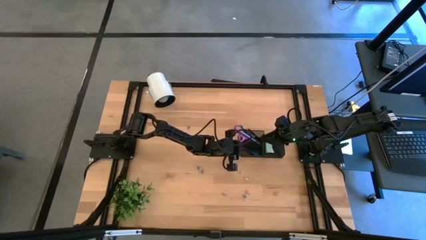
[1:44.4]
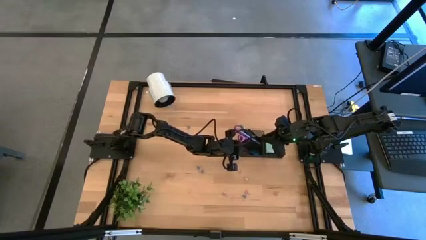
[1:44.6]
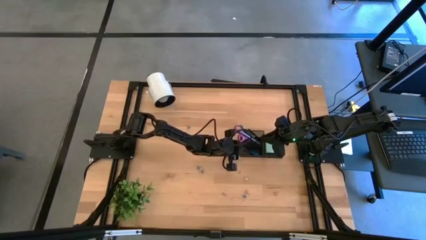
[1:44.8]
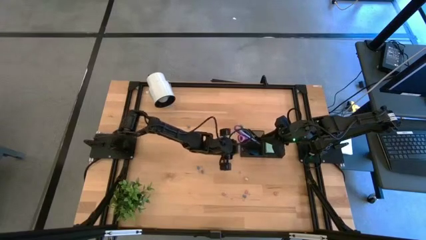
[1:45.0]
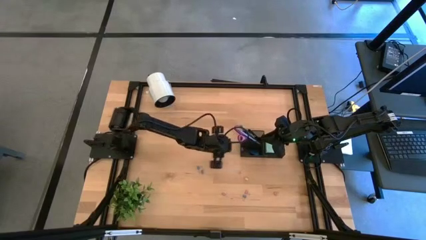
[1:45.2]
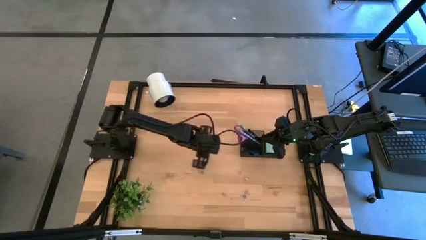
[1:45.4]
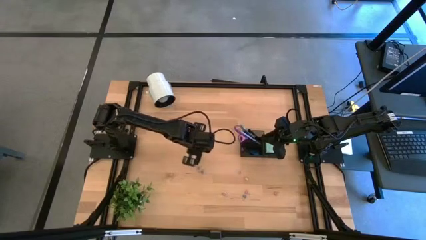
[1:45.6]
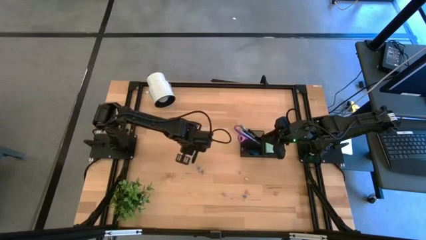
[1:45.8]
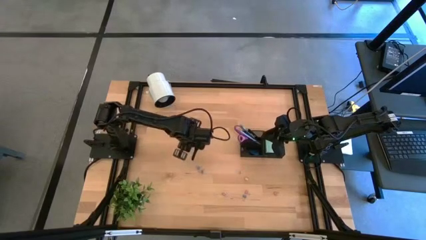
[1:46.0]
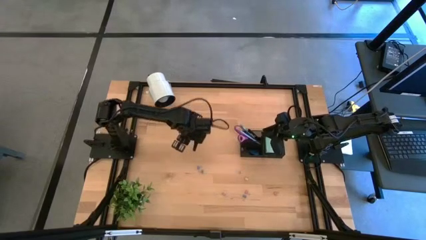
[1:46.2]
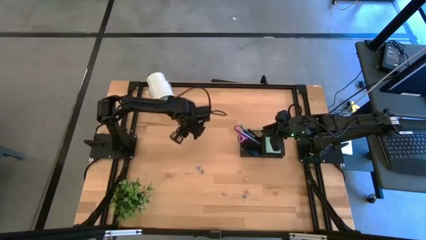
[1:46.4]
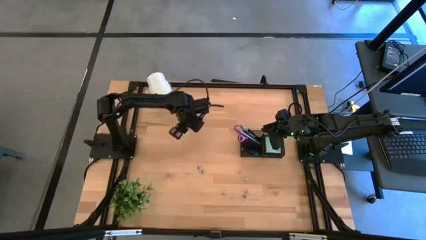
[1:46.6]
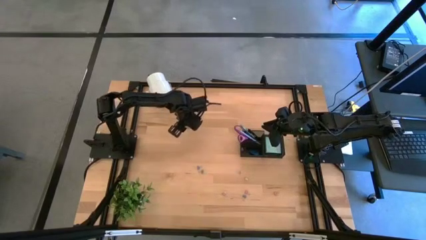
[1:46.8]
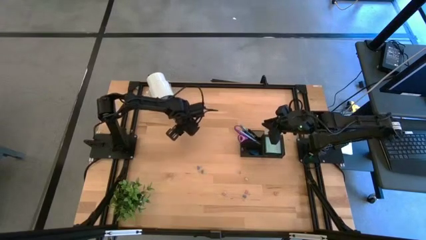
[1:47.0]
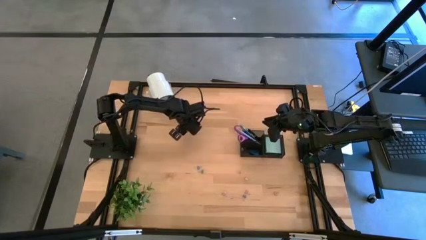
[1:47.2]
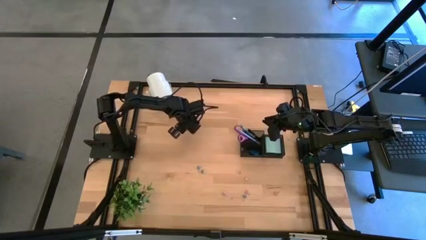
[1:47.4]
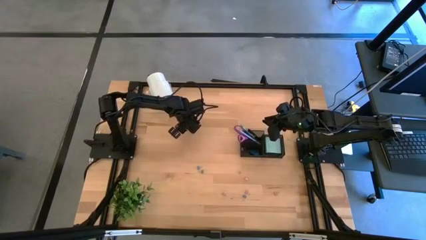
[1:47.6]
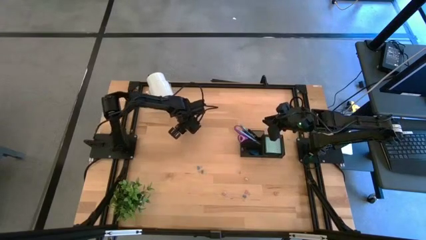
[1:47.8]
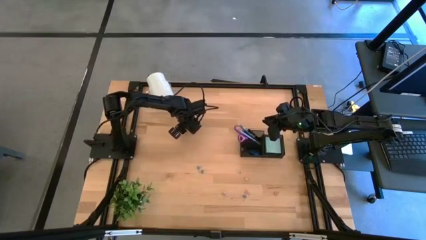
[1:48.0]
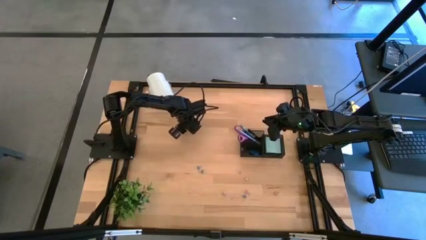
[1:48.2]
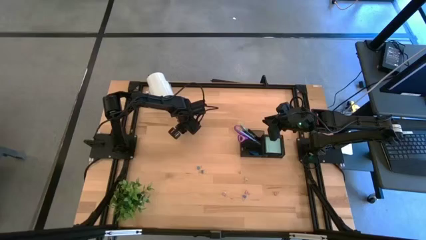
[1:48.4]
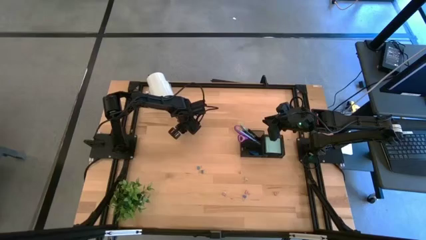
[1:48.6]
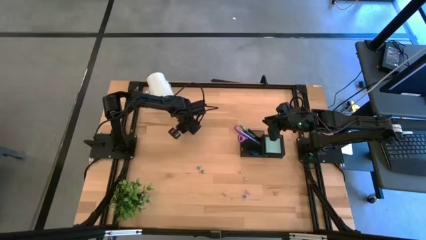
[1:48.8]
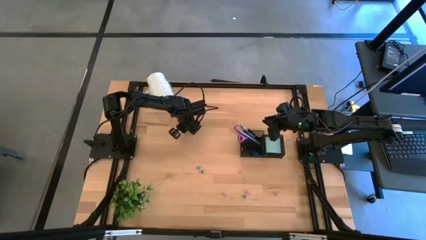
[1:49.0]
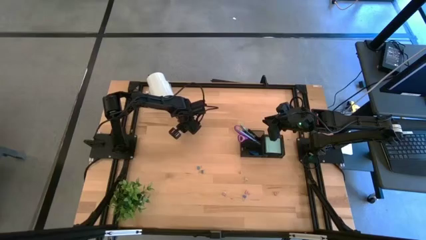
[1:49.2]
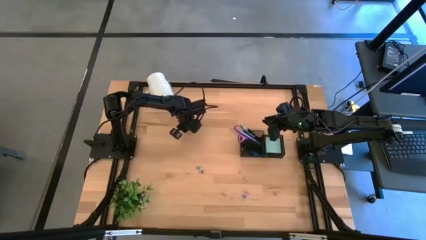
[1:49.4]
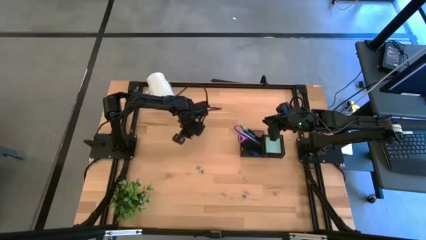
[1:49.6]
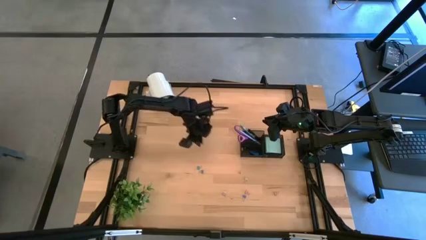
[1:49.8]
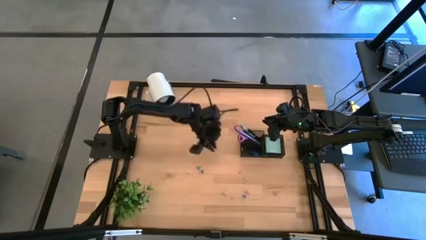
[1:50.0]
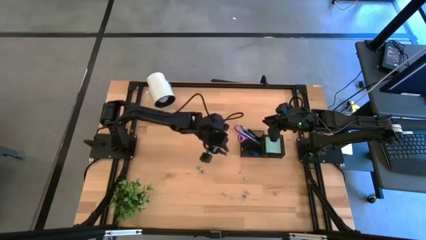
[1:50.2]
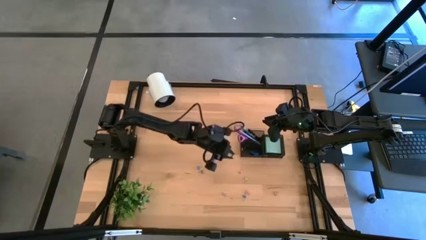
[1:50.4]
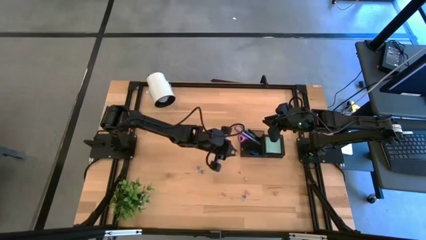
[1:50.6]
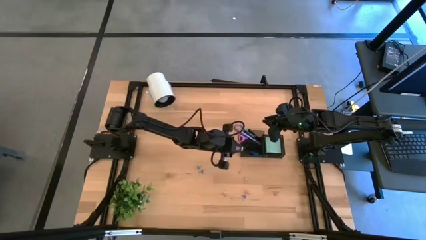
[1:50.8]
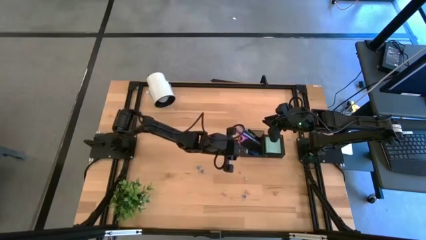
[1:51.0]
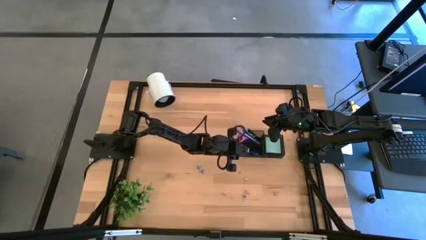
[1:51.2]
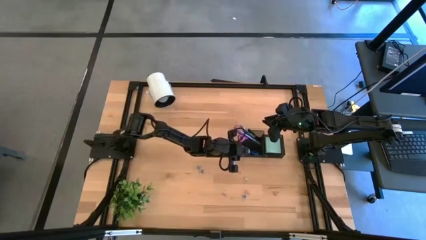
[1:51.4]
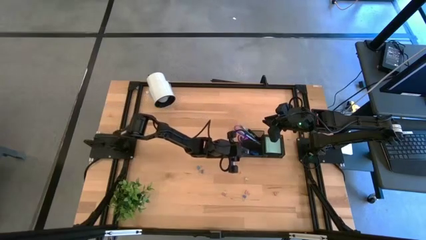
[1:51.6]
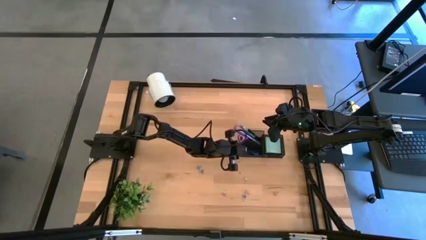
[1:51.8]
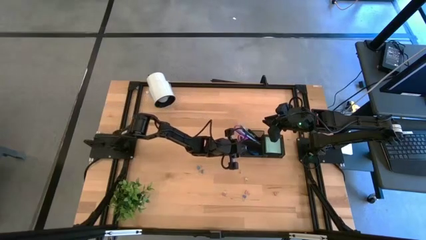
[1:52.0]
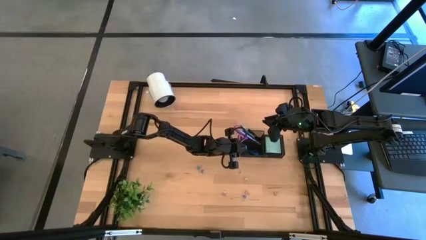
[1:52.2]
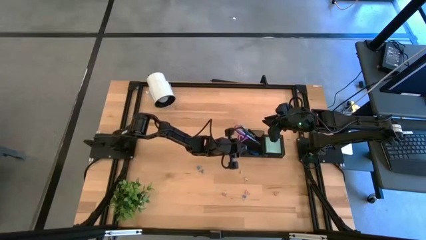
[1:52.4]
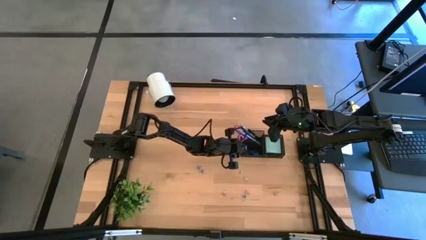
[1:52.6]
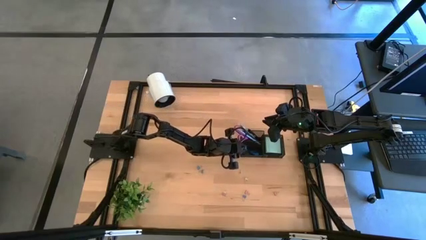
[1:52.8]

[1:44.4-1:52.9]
Task: Pick and place office supplies into organizer
Put the blue binder clip into the black desk organizer

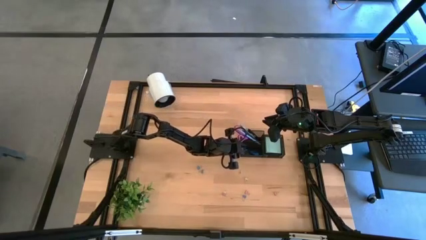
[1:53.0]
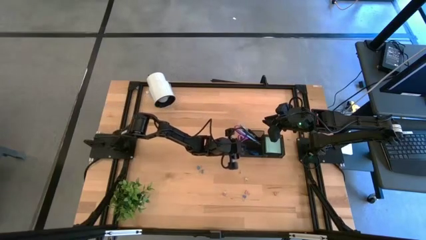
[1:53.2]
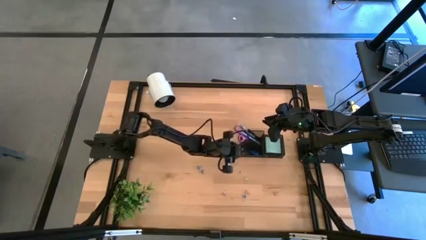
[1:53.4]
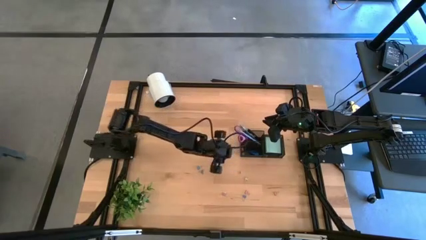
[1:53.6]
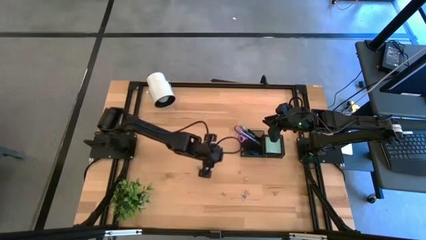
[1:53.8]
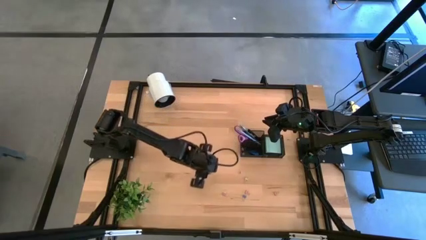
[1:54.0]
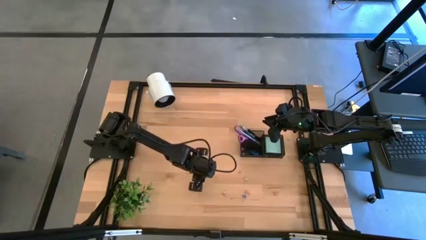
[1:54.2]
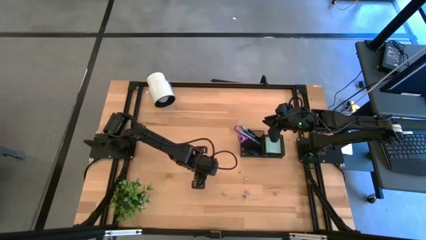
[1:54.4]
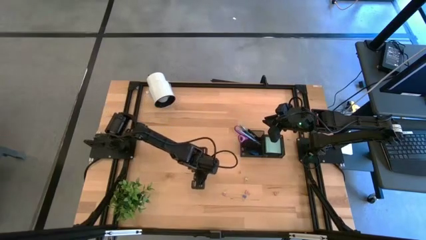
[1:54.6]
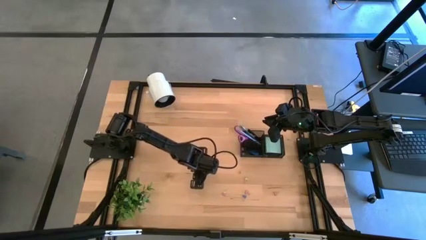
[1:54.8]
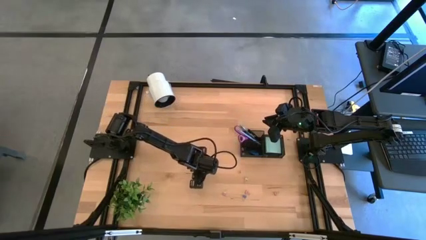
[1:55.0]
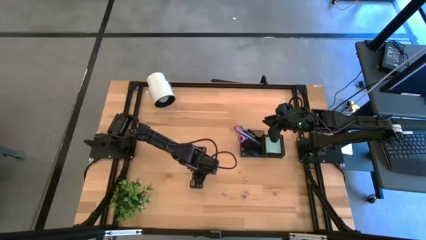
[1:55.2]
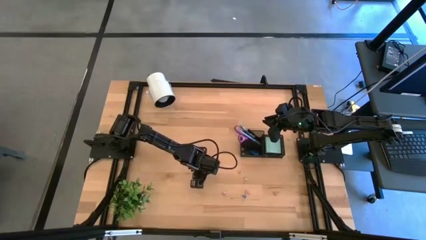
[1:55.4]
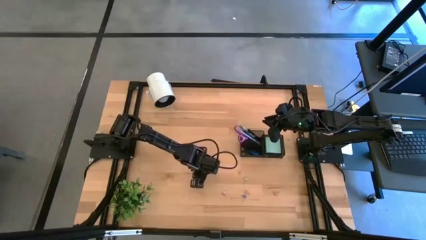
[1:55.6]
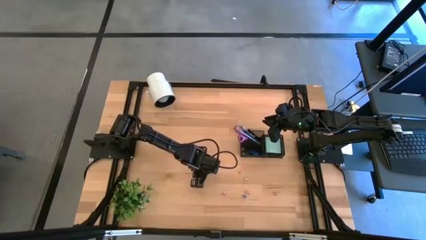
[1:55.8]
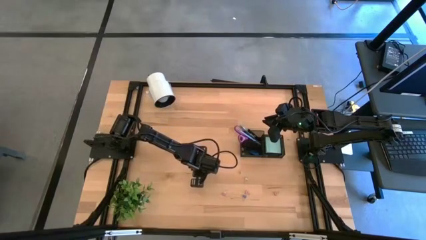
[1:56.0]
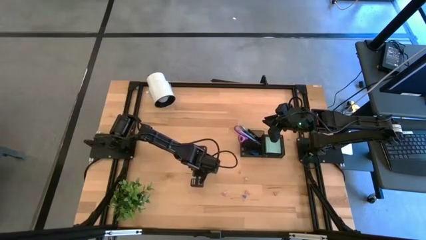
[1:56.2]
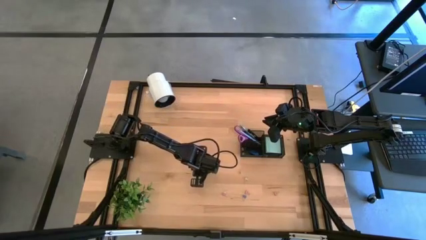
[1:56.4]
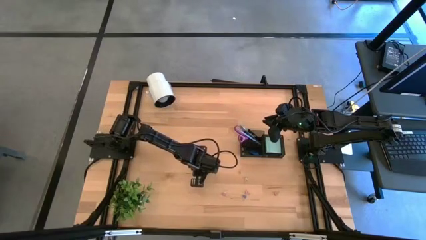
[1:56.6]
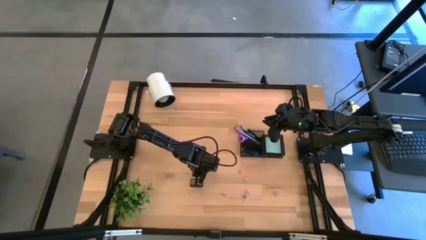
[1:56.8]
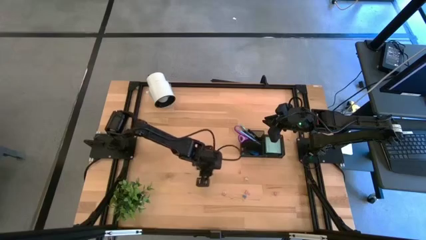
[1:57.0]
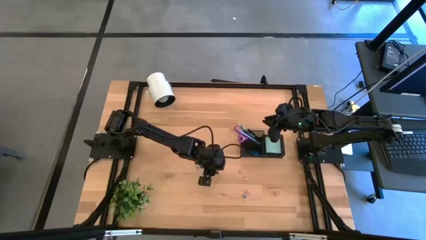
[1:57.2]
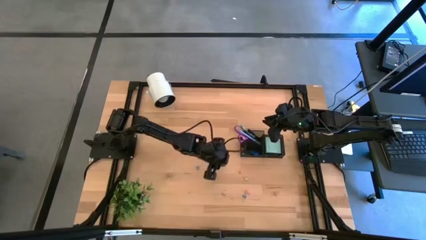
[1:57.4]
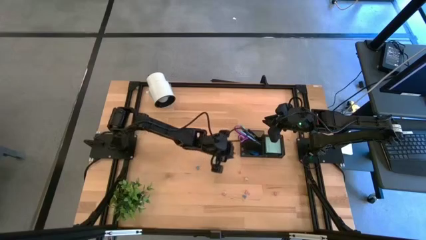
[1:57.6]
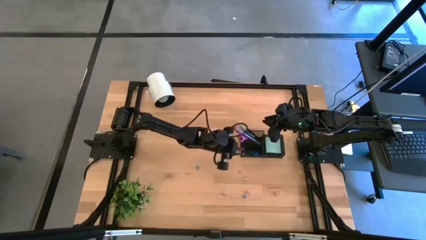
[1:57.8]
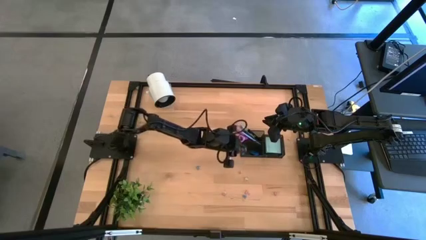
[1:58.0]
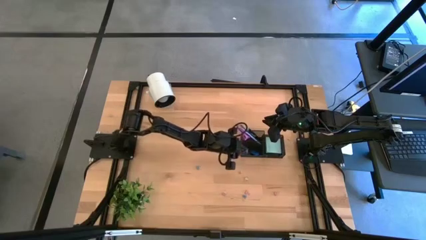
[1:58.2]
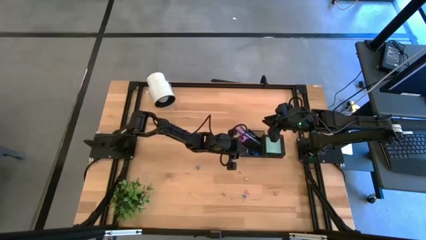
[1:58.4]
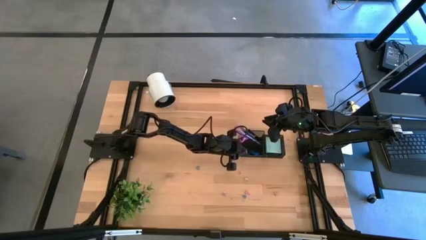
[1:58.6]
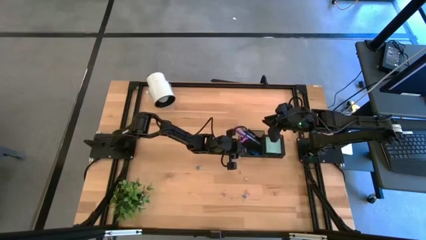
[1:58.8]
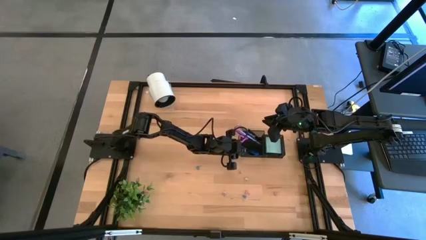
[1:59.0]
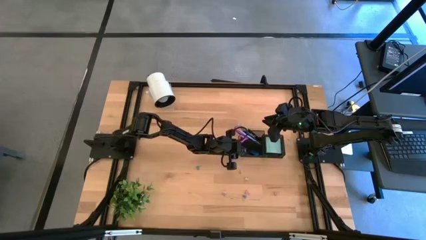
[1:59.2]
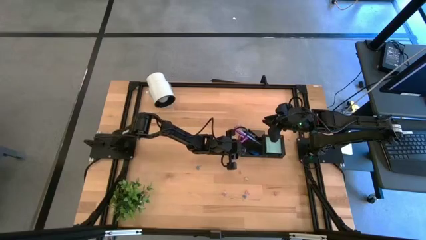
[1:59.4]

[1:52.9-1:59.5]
Put the blue binder clip into the black desk organizer
